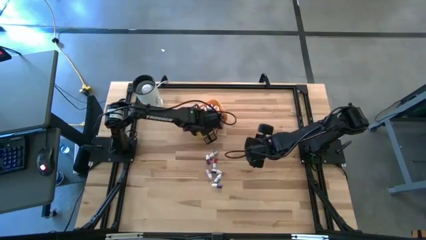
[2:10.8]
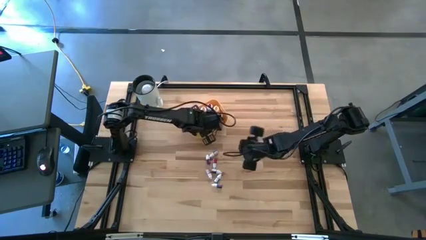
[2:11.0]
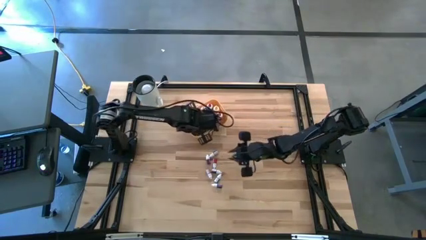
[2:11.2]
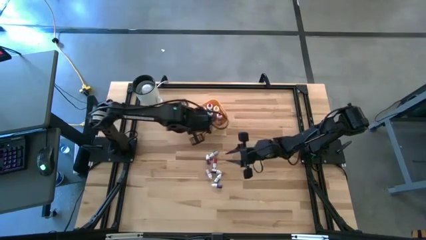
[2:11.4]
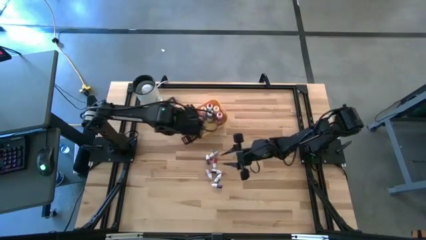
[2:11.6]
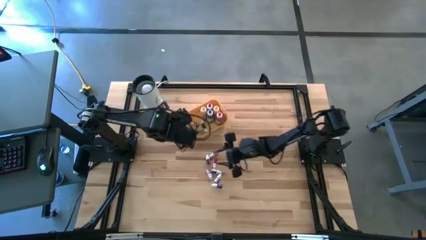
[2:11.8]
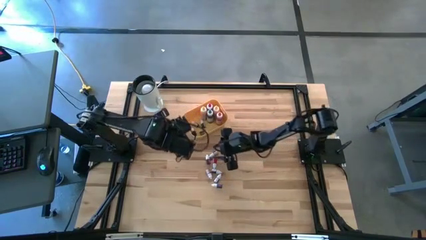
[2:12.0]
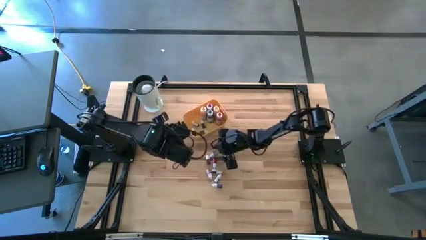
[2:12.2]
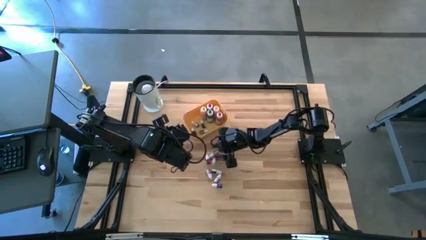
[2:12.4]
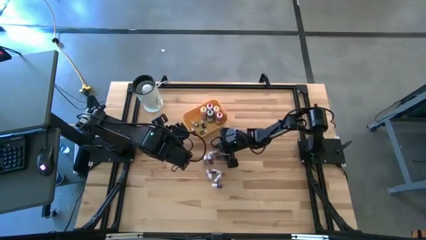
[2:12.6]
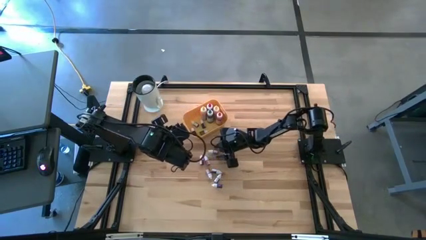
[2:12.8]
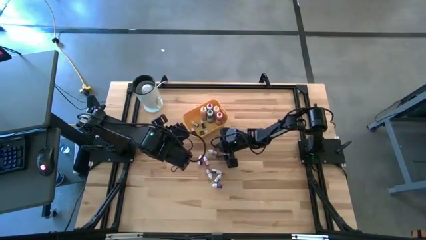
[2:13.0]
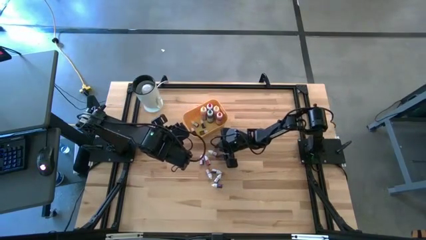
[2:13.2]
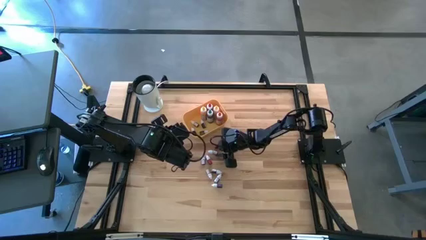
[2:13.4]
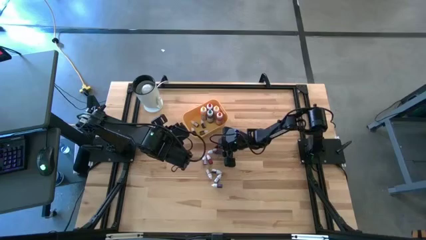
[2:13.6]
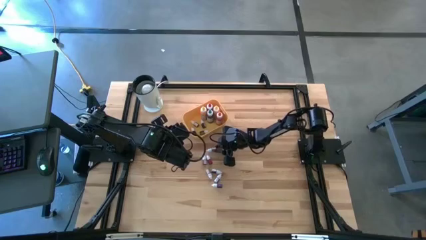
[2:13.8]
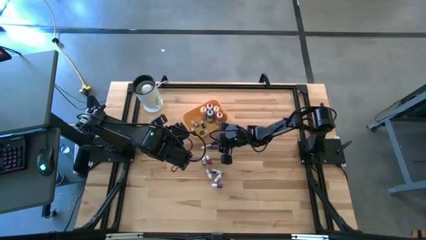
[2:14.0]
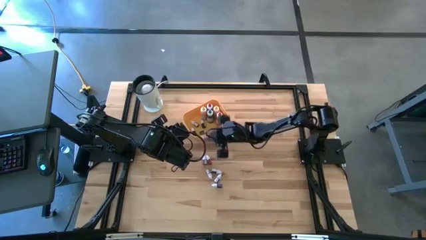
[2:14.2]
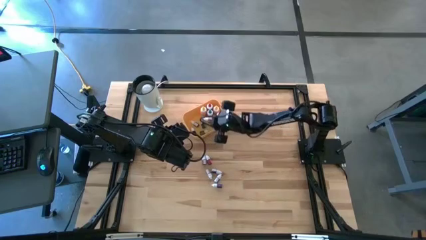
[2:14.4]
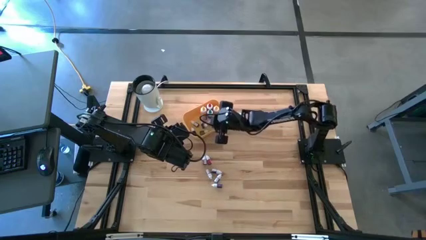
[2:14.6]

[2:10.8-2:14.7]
Task: Pick & Place food coloring
Put the small pink food coloring bottle into the yellow bin

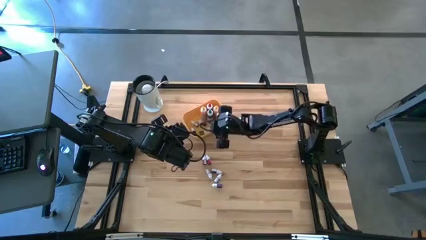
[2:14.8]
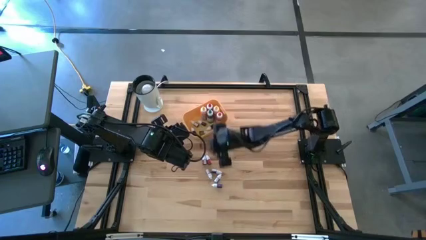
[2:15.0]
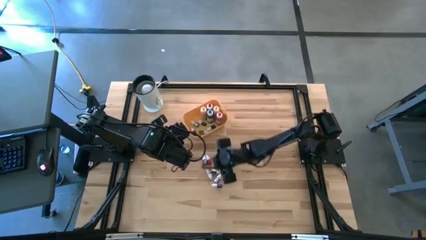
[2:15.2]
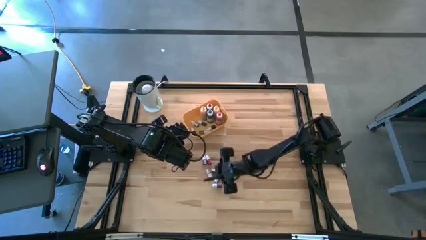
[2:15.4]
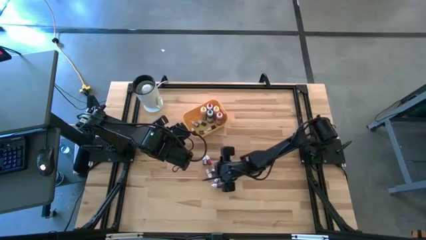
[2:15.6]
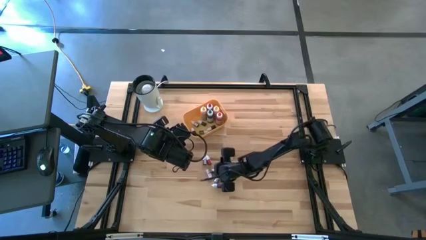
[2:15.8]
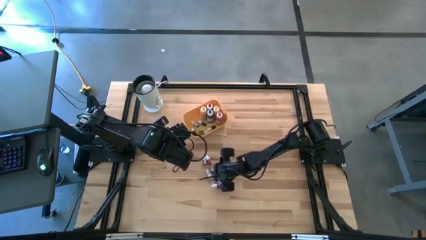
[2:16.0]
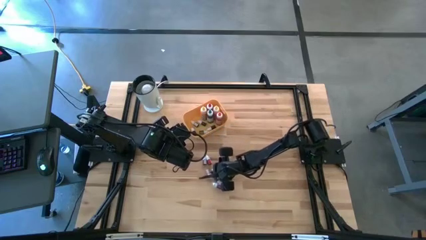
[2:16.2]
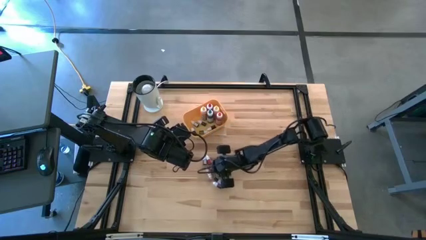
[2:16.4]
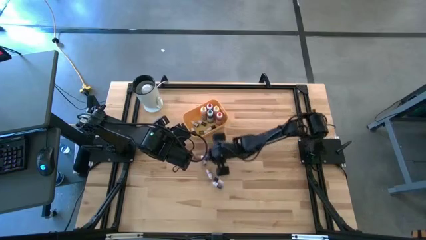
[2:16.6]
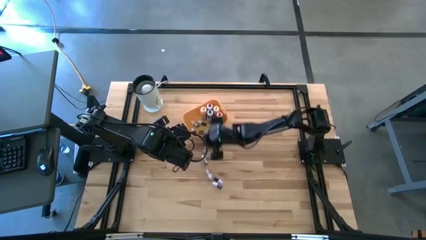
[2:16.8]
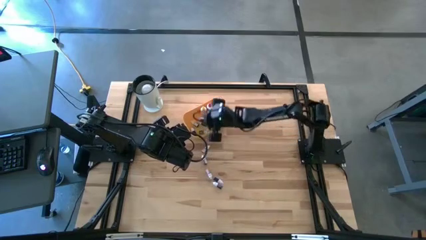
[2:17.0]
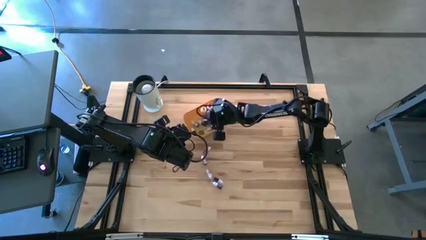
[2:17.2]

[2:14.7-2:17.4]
Put the small dark green food coloring bottle into the yellow bin

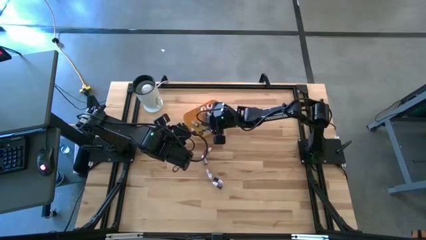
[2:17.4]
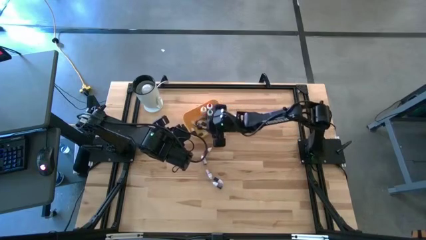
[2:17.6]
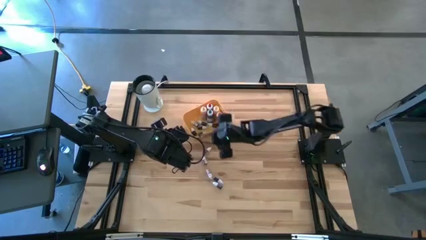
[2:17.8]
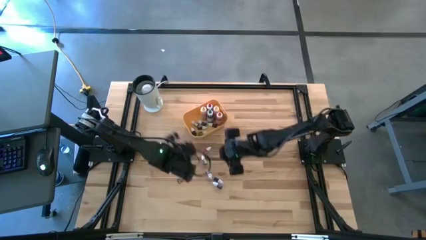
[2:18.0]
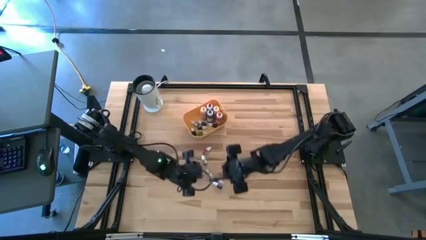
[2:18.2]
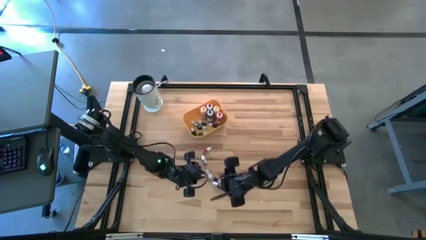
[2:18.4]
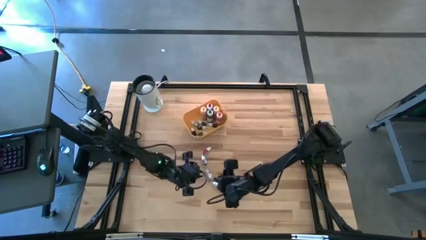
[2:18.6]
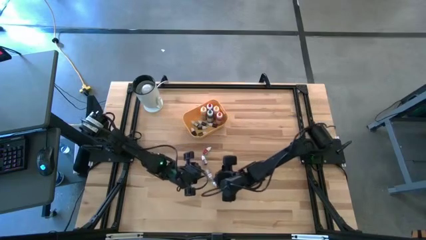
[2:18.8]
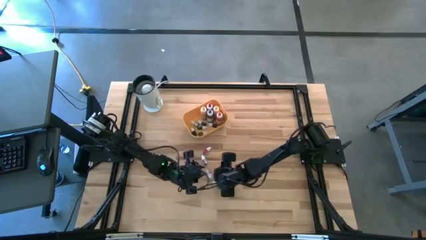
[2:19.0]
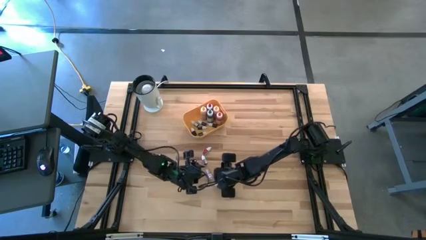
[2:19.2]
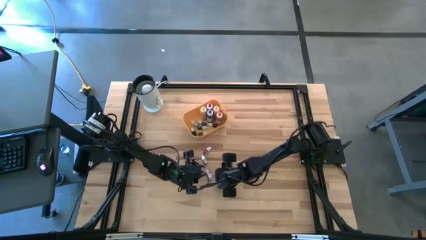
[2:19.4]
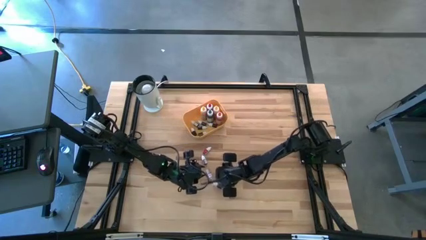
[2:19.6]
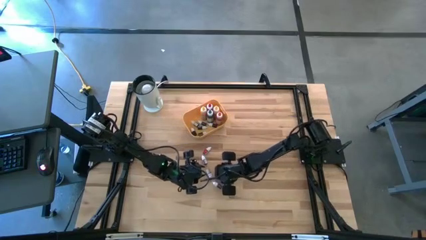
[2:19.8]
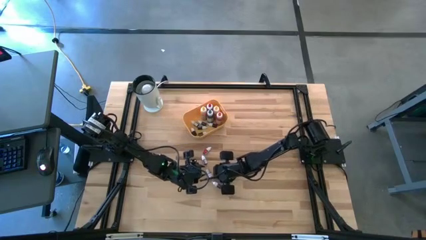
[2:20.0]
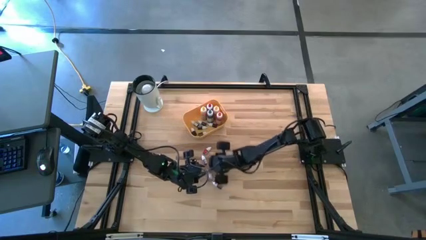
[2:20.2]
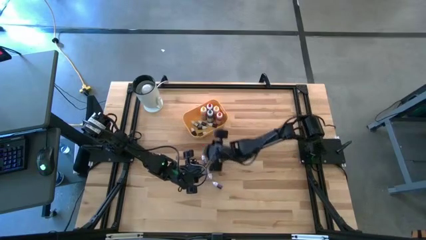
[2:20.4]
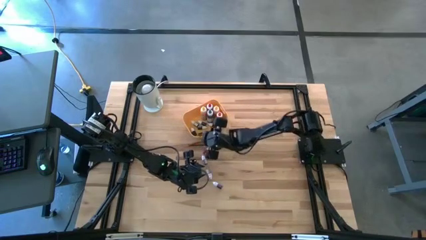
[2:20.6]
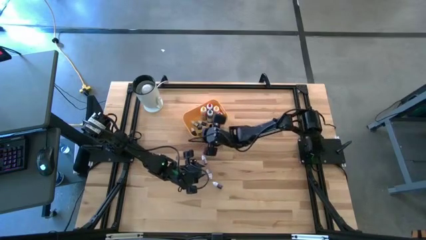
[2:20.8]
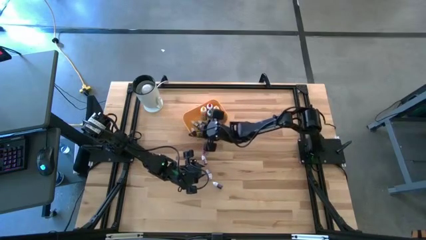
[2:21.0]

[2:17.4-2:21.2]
Put the small dark green food coloring bottle into the yellow bin

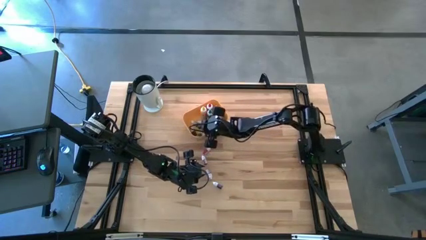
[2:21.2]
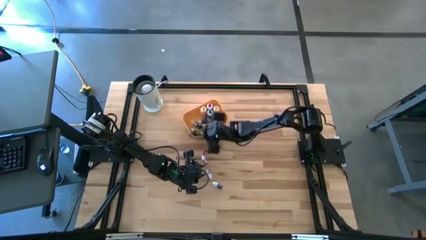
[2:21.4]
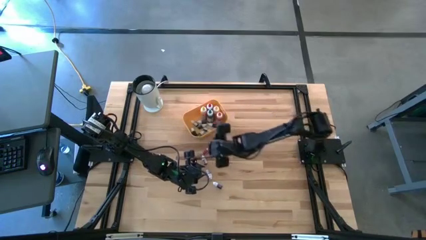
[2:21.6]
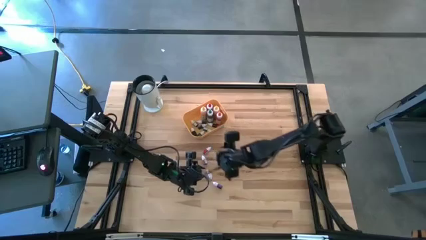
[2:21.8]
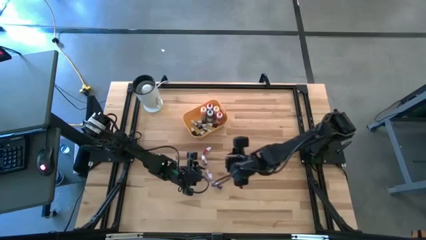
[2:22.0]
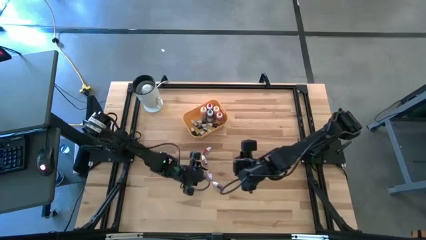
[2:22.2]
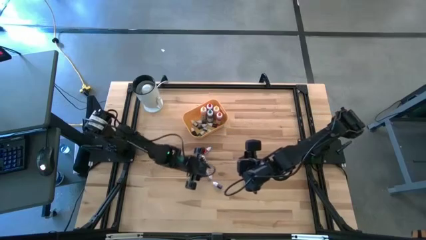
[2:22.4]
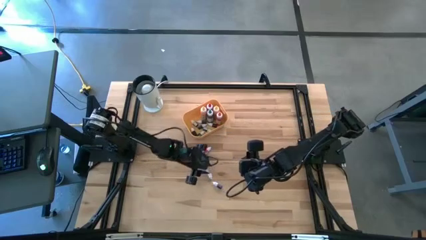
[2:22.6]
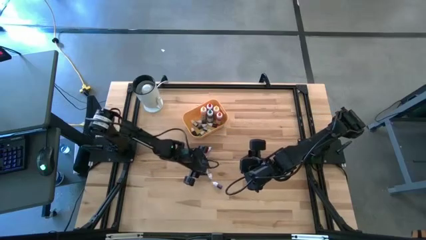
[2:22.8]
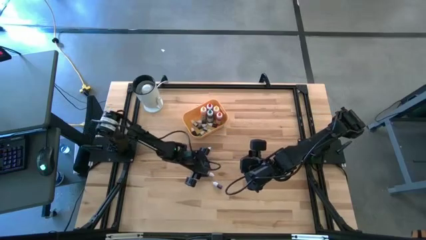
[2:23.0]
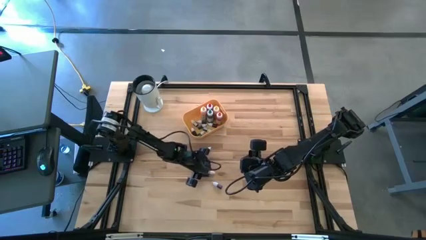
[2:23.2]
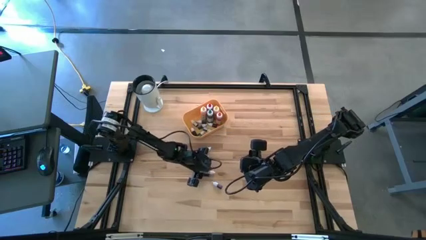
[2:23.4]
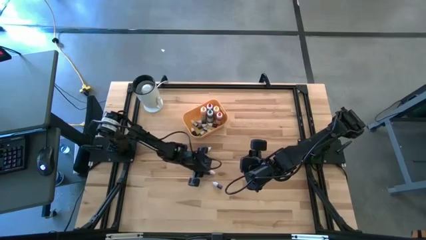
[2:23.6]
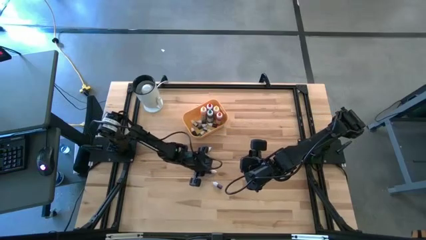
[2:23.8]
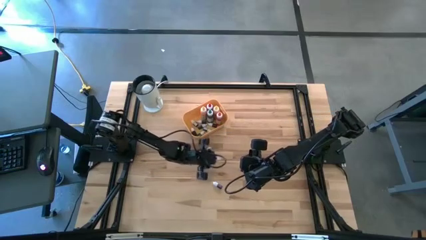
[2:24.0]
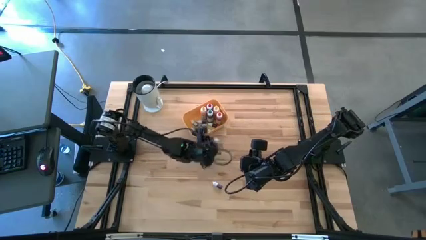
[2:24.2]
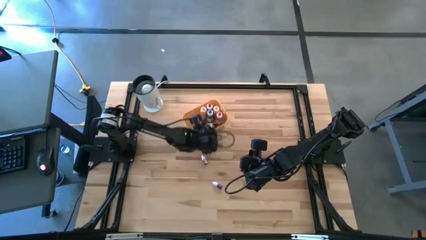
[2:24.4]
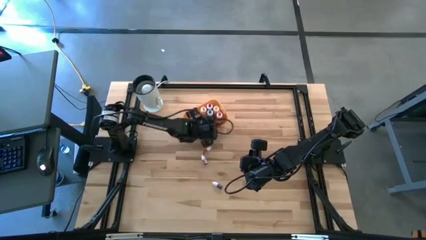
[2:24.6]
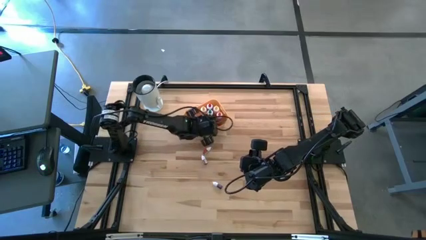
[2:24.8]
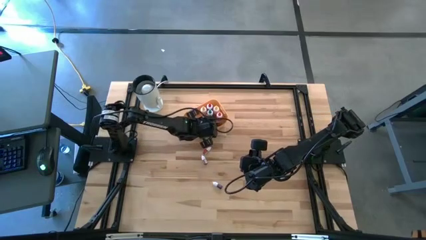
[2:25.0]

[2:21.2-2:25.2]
Put the small orange food coloring bottle into the yellow bin

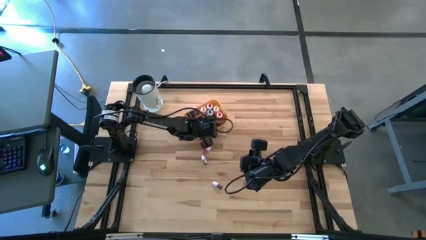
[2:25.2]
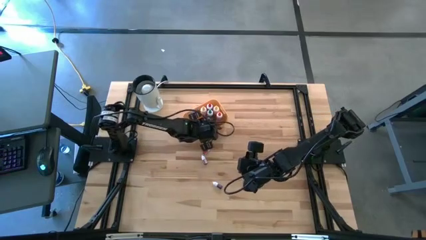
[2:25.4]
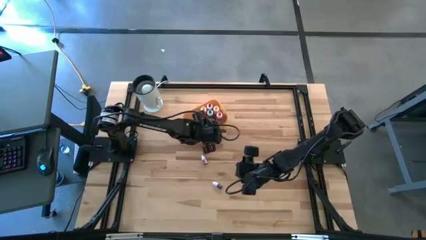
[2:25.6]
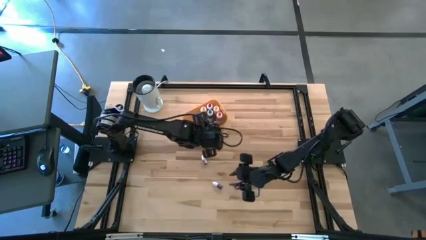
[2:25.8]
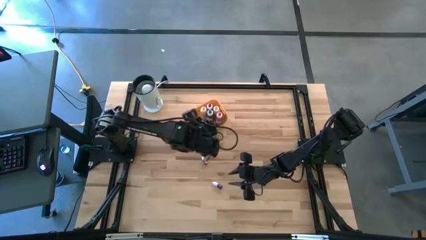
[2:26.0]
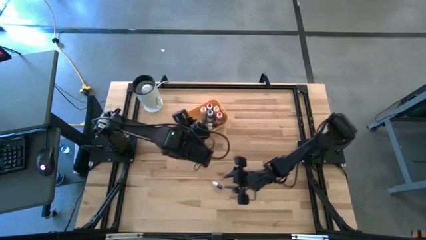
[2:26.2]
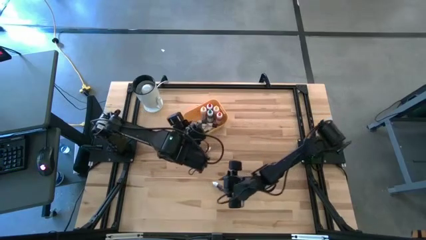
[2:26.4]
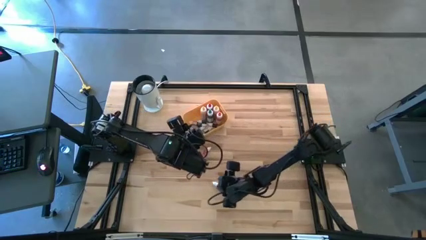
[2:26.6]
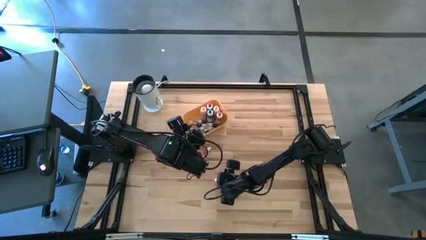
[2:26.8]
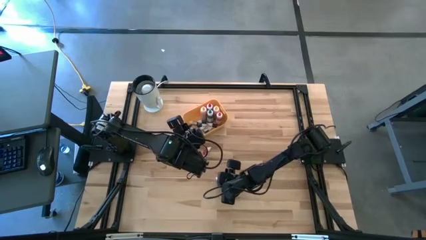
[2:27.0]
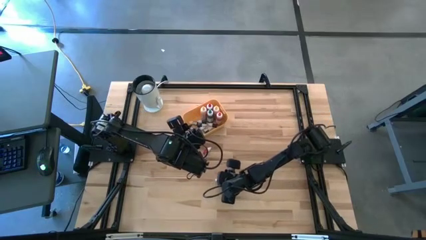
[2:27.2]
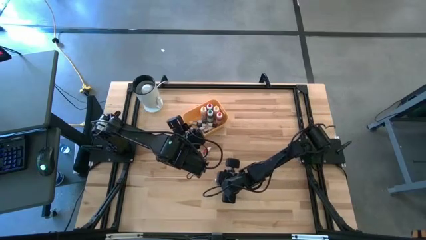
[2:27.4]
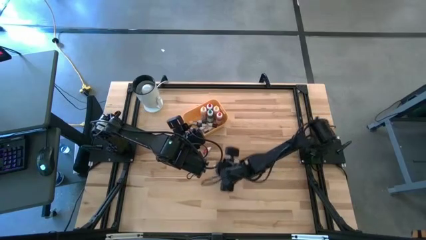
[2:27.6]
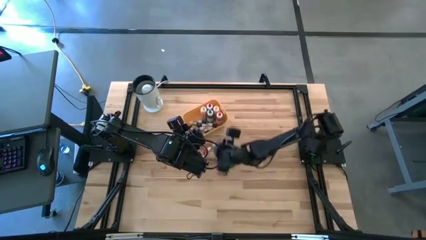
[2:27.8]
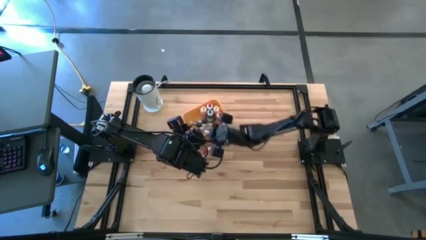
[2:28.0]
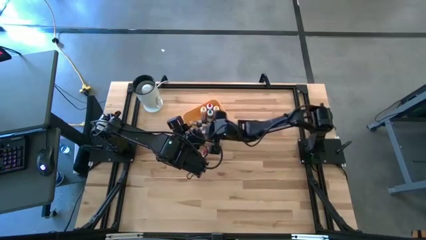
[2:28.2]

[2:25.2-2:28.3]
Put the small purple food coloring bottle into the yellow bin
